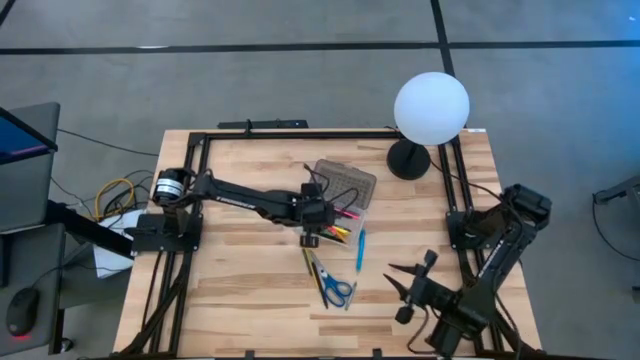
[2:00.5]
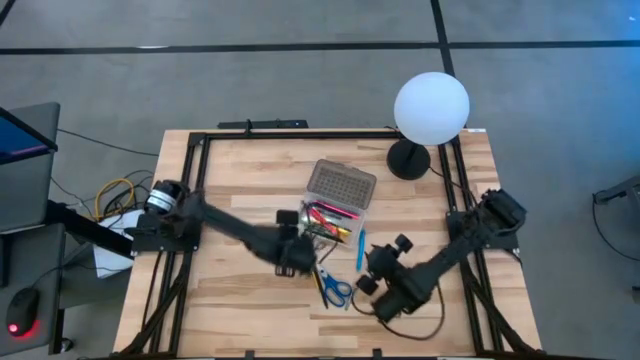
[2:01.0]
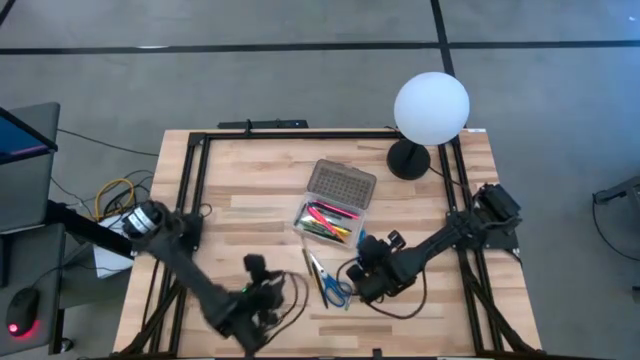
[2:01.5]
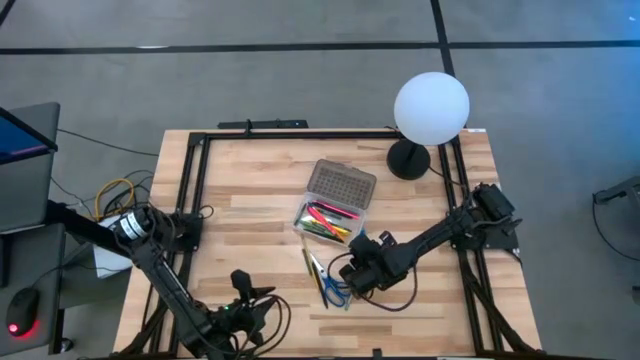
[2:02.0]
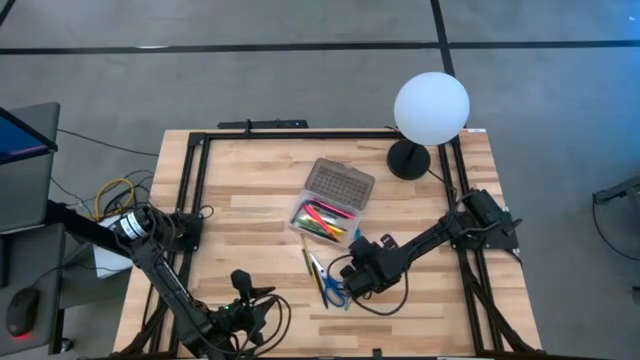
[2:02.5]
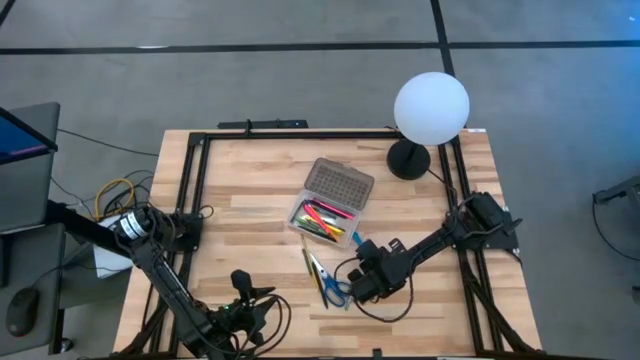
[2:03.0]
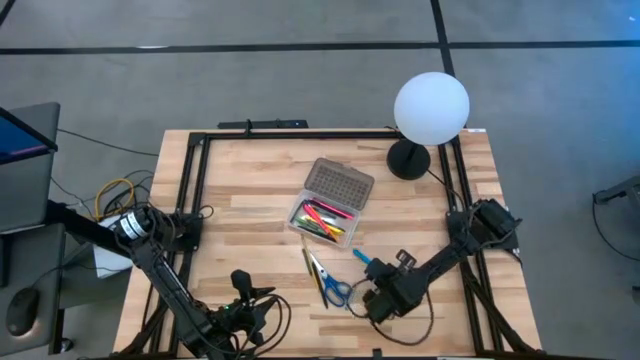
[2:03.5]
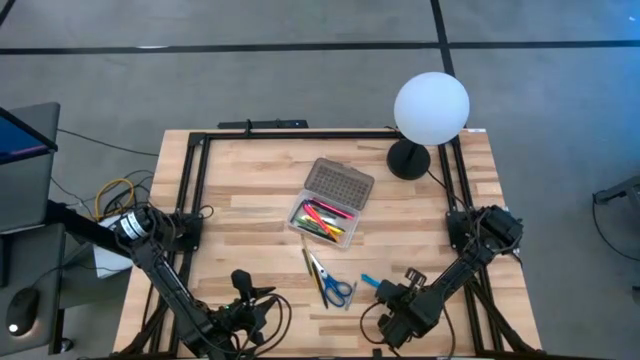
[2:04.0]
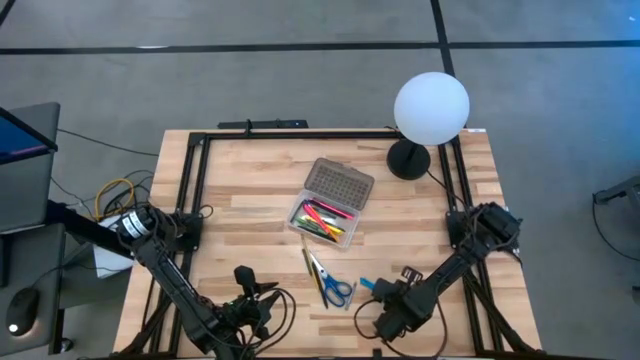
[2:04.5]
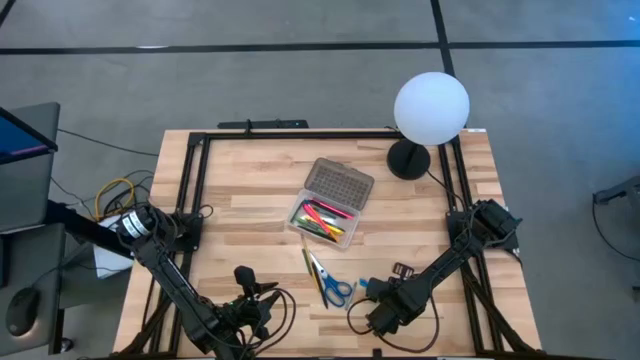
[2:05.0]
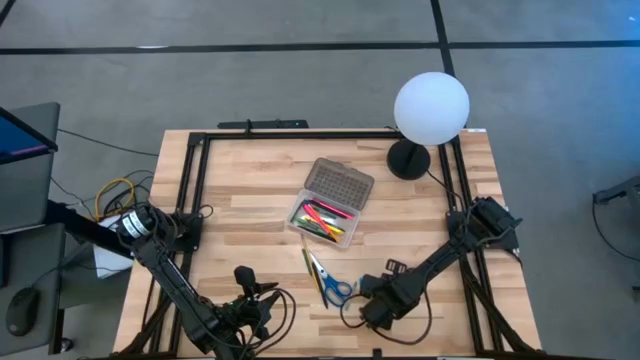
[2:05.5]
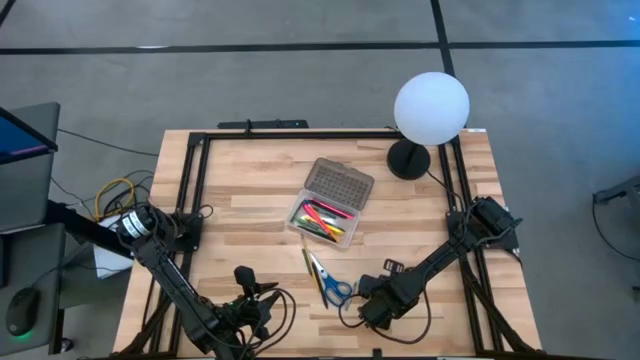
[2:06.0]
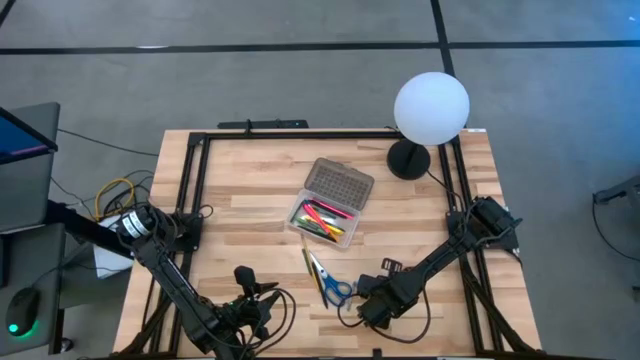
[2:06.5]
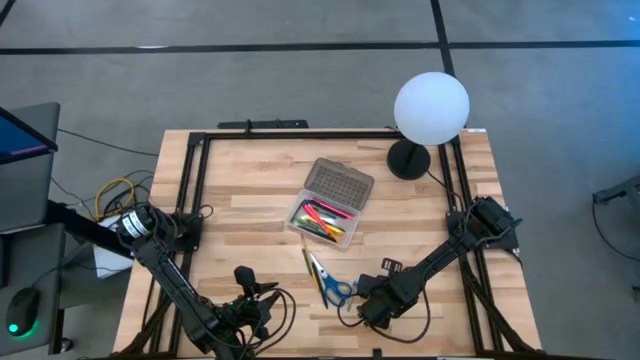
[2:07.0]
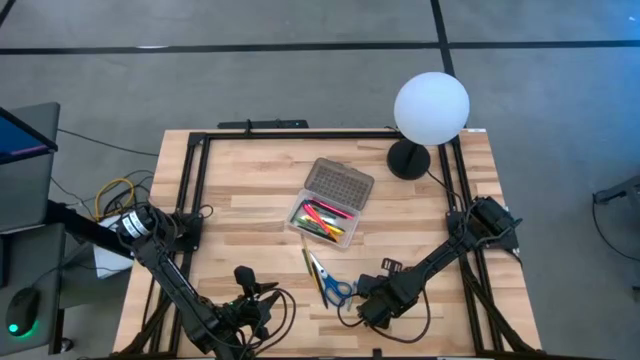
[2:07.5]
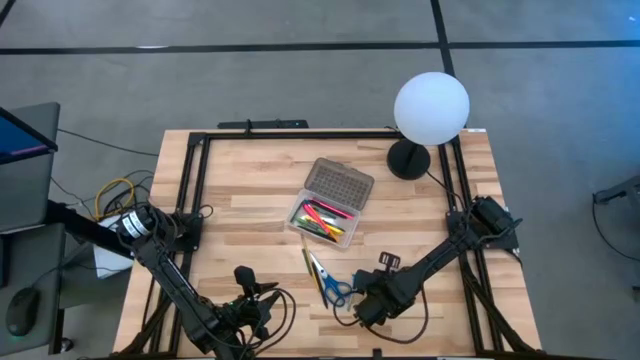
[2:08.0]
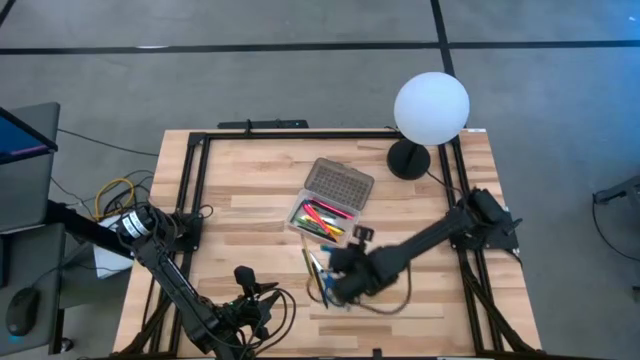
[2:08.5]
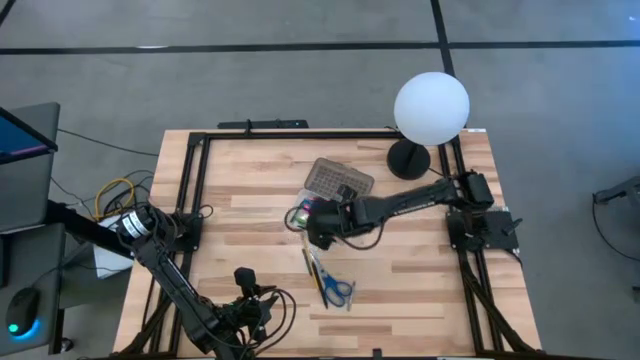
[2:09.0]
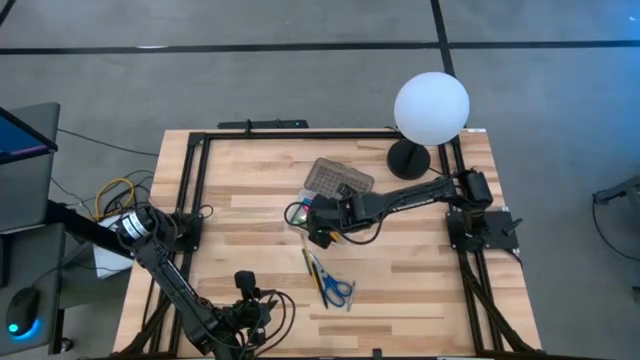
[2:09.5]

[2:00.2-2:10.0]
Task: Pick & place school supplies into a supply box
Put the blue pen into the gray supply box

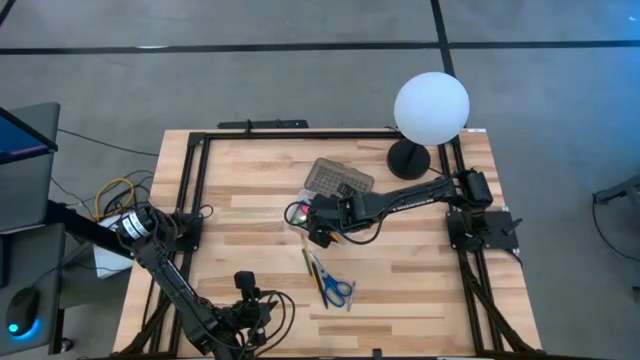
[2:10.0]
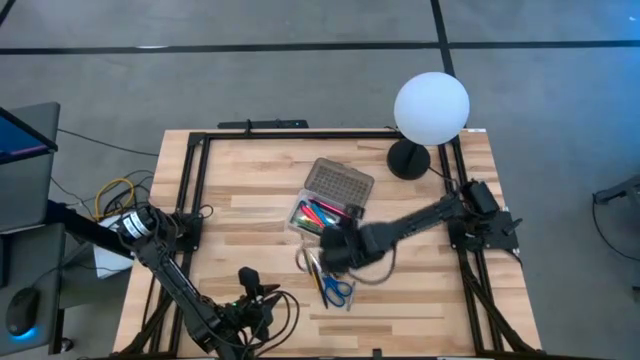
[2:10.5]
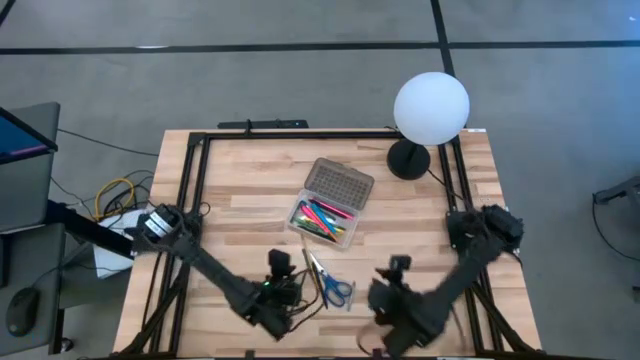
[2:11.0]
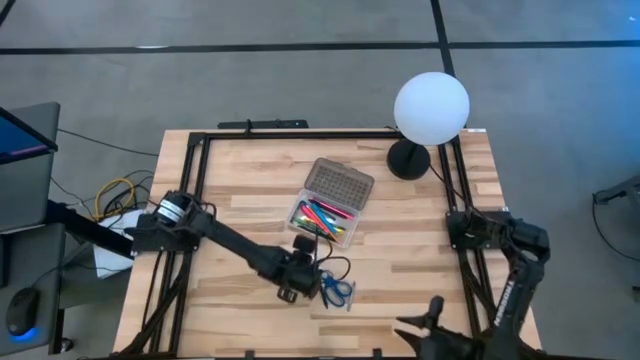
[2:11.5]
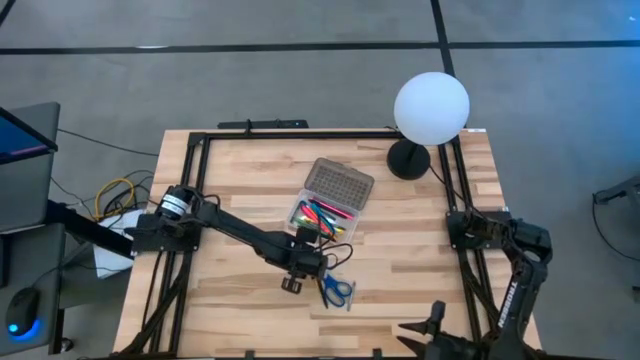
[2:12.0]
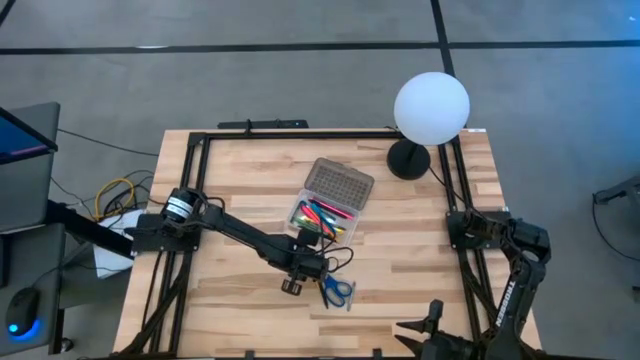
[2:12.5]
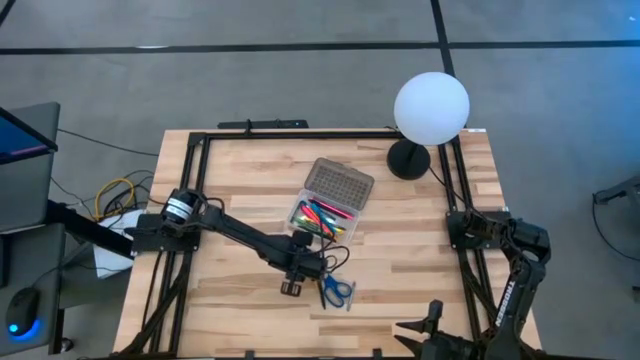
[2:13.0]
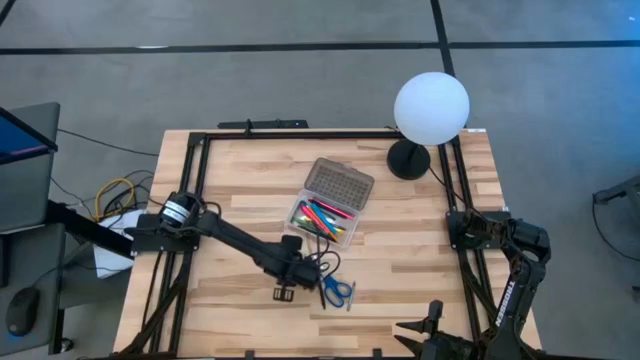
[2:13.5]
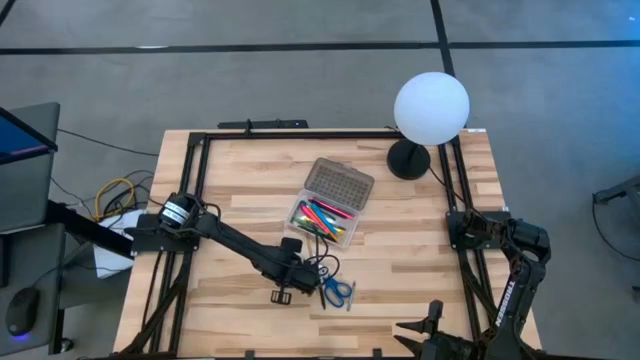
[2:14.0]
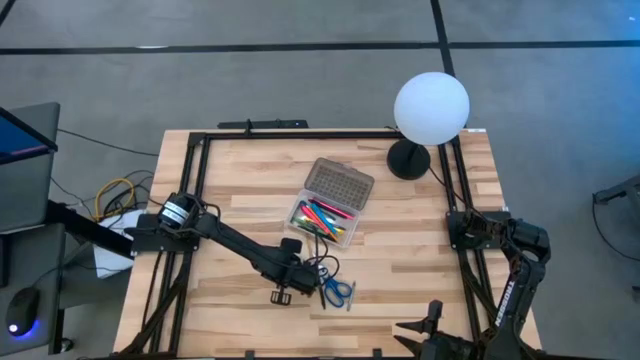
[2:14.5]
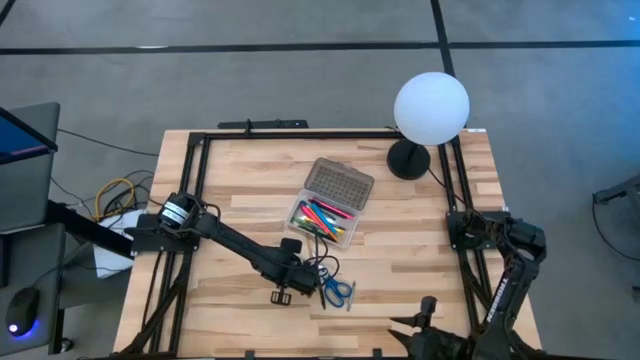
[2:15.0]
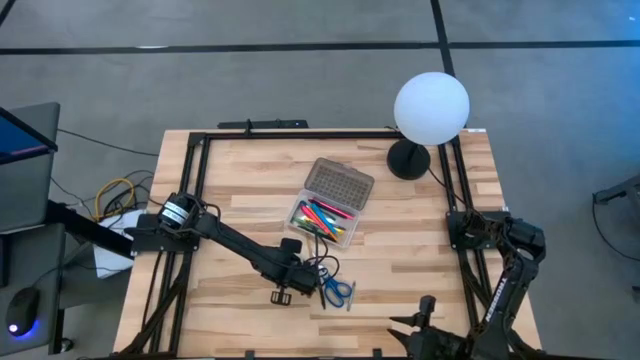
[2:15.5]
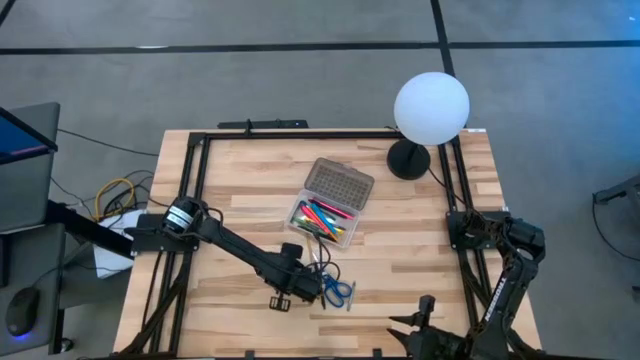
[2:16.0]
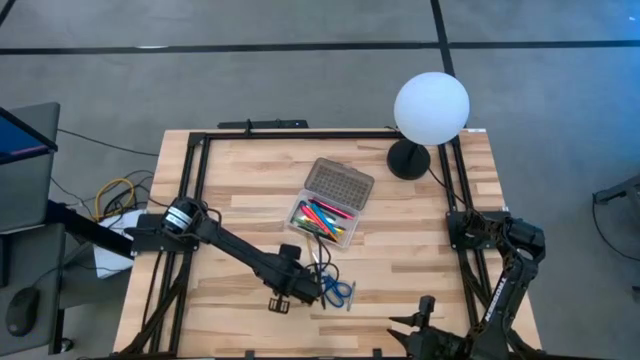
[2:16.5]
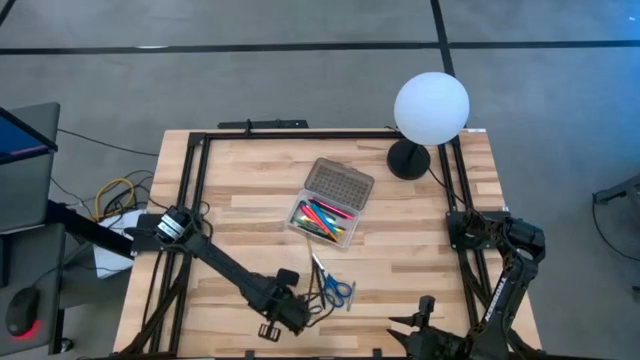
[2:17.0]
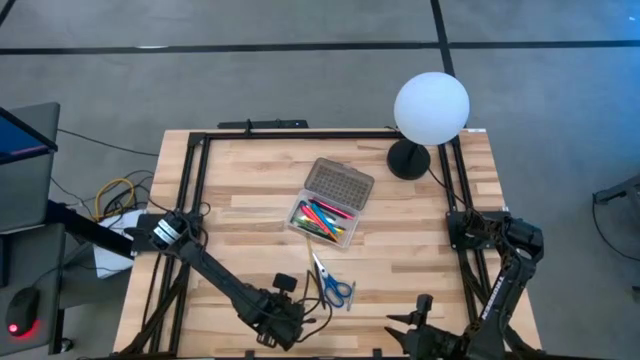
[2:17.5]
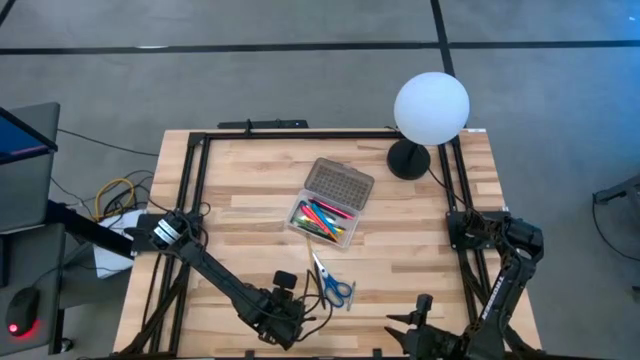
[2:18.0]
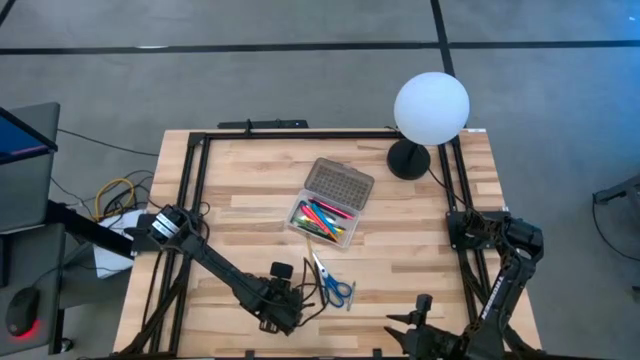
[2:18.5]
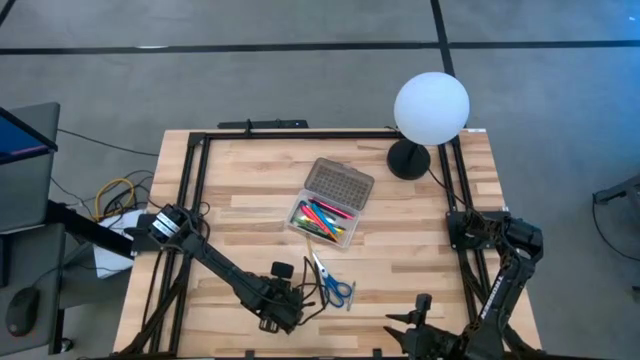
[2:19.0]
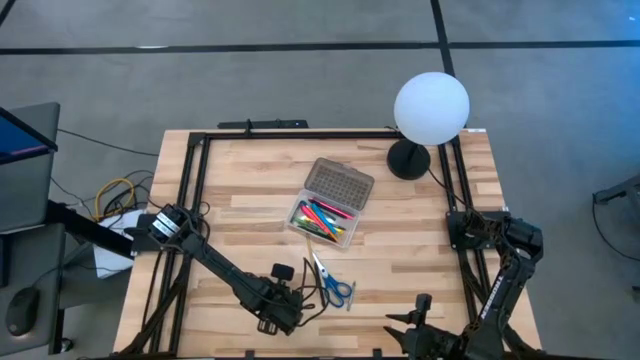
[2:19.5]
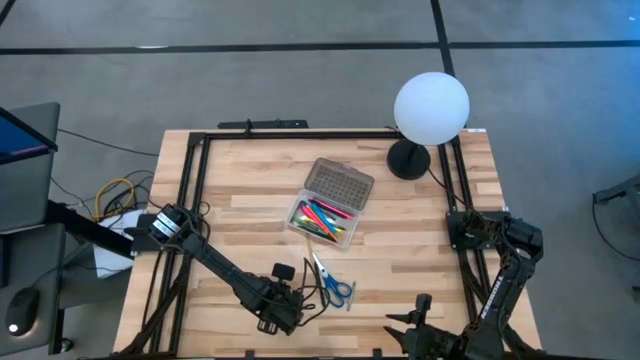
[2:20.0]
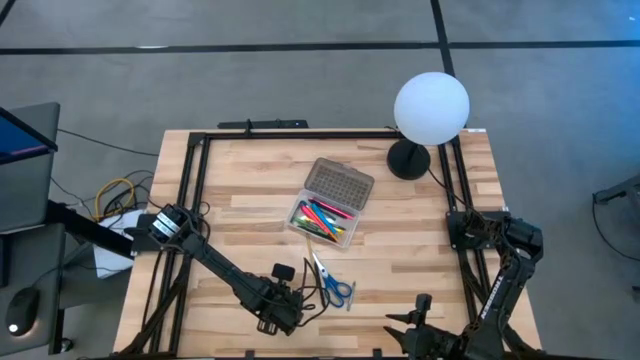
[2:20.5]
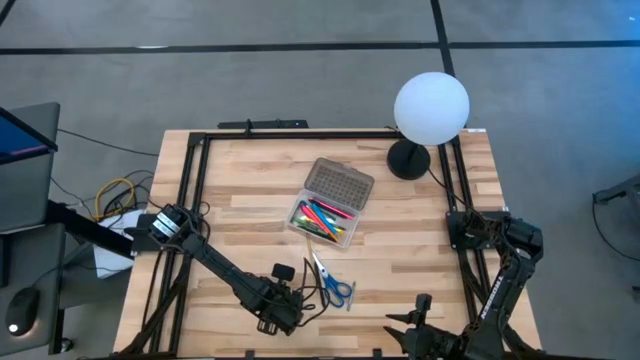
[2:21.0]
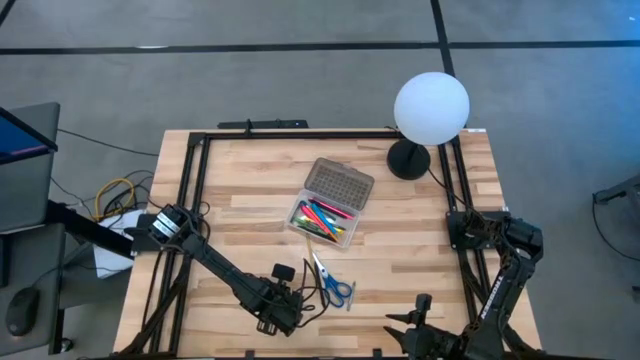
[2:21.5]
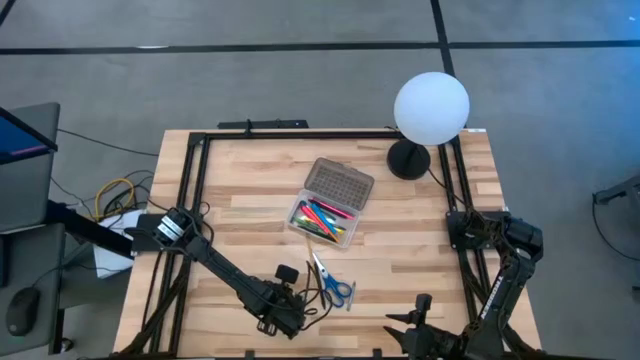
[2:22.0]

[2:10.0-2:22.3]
Put the green crayon into the gray supply box
